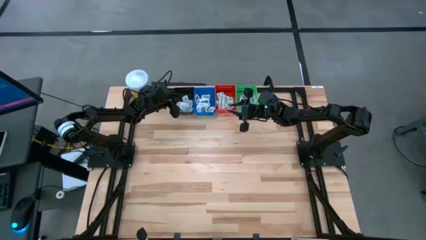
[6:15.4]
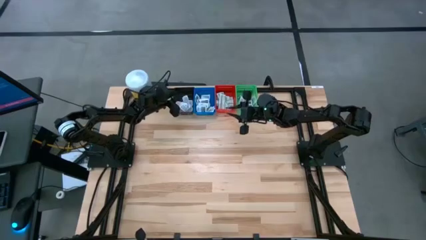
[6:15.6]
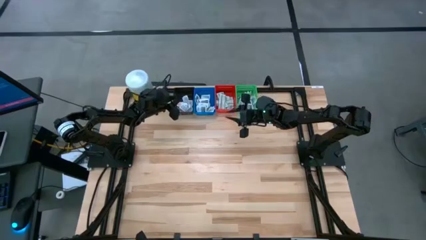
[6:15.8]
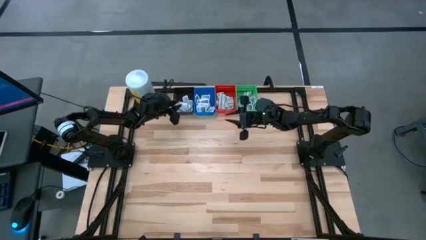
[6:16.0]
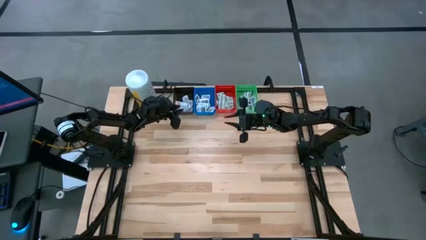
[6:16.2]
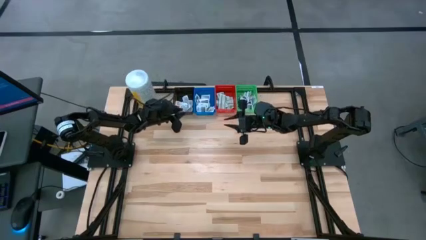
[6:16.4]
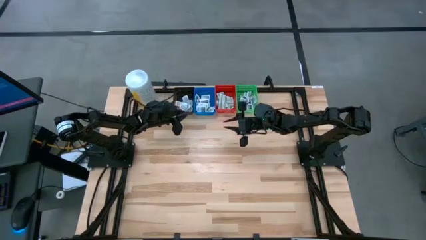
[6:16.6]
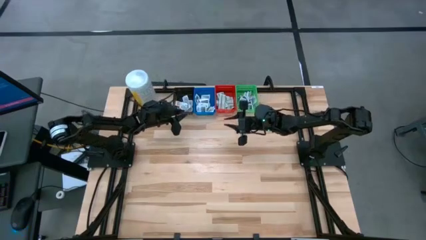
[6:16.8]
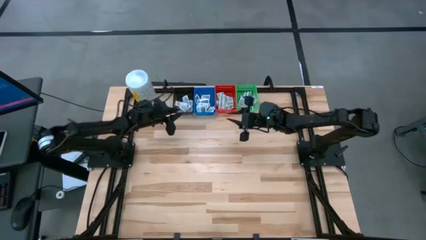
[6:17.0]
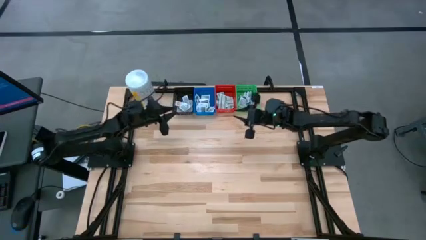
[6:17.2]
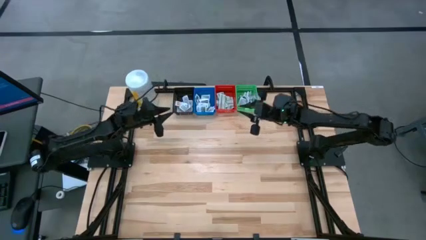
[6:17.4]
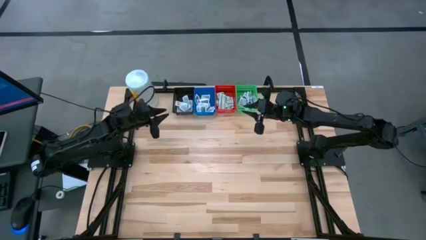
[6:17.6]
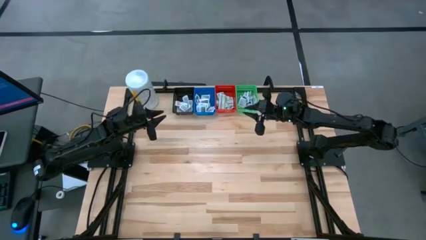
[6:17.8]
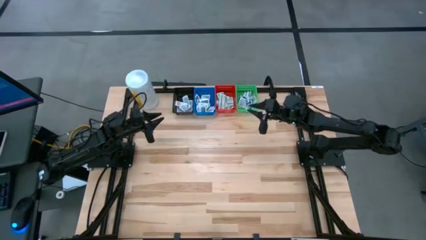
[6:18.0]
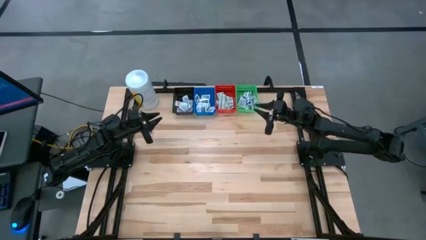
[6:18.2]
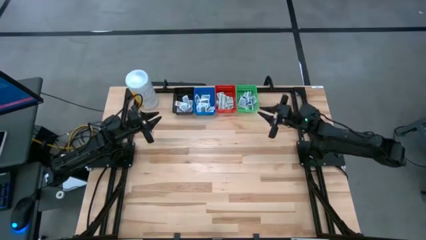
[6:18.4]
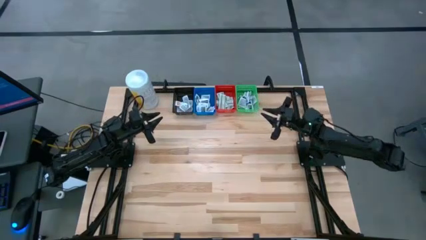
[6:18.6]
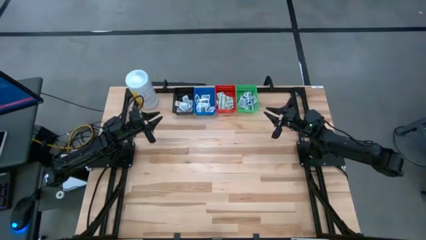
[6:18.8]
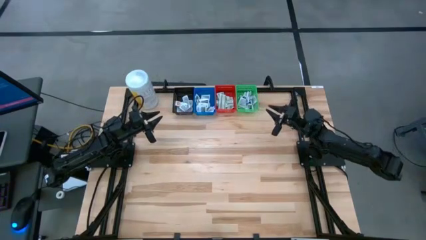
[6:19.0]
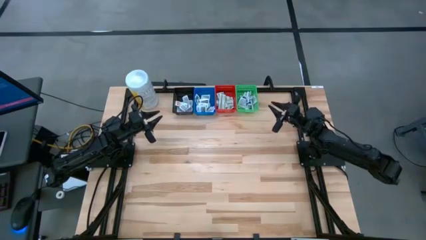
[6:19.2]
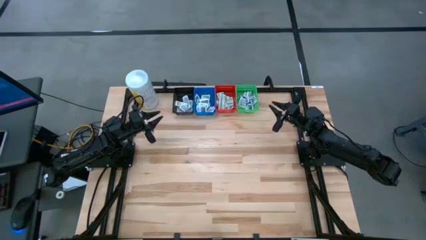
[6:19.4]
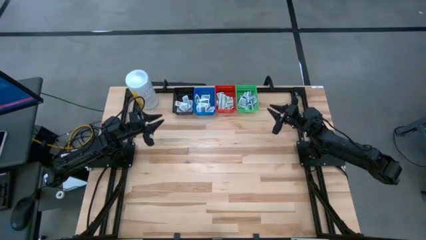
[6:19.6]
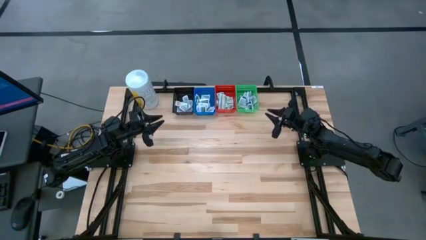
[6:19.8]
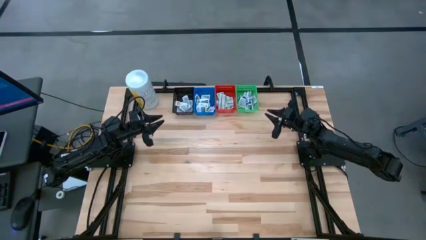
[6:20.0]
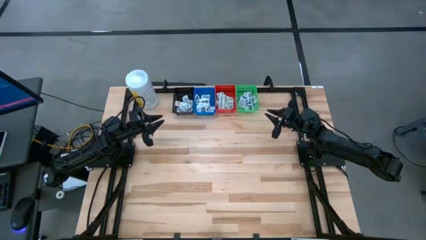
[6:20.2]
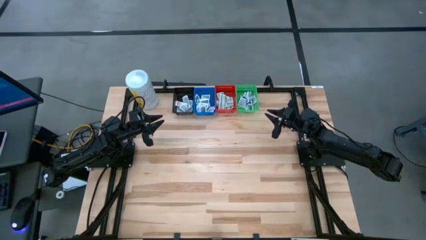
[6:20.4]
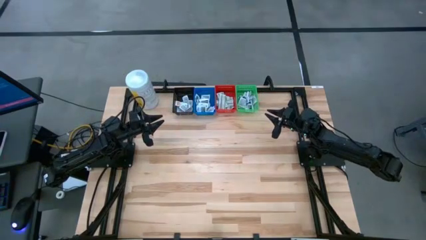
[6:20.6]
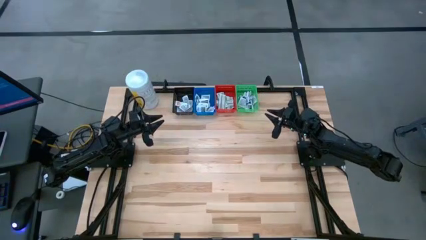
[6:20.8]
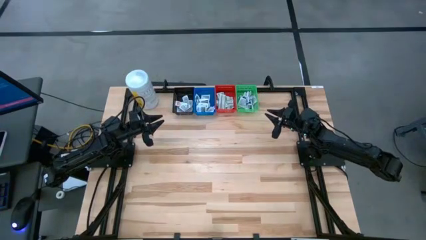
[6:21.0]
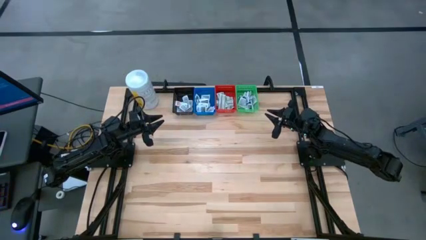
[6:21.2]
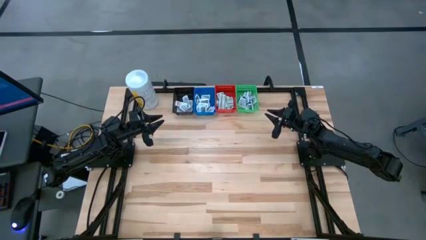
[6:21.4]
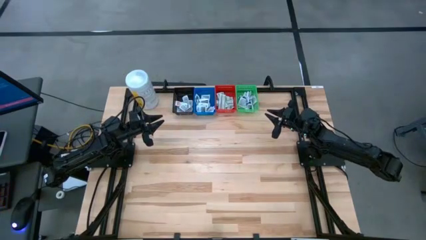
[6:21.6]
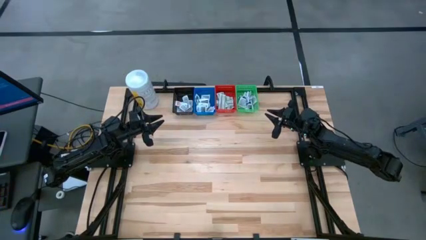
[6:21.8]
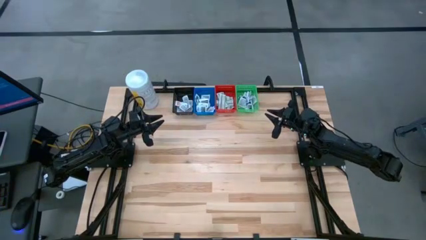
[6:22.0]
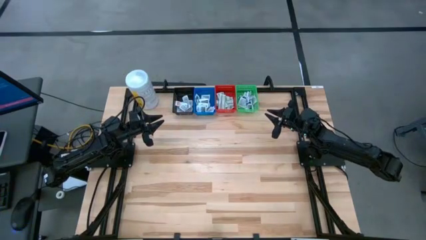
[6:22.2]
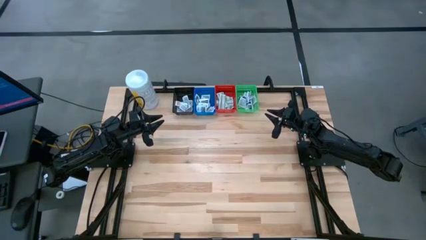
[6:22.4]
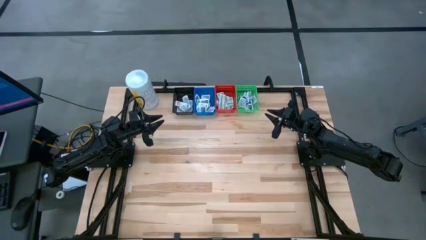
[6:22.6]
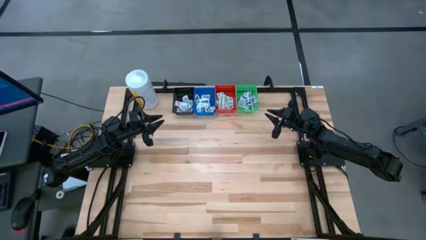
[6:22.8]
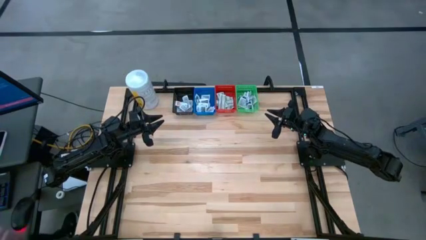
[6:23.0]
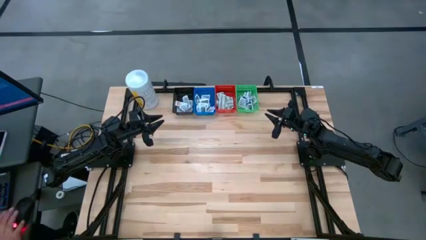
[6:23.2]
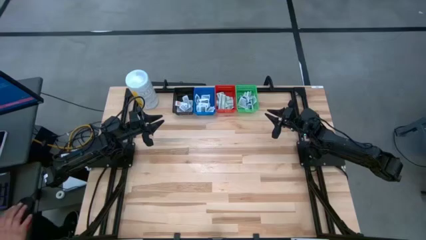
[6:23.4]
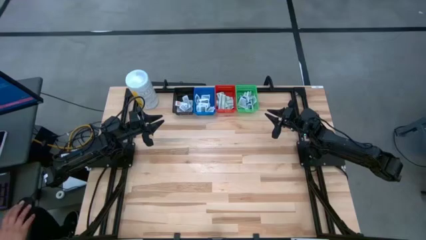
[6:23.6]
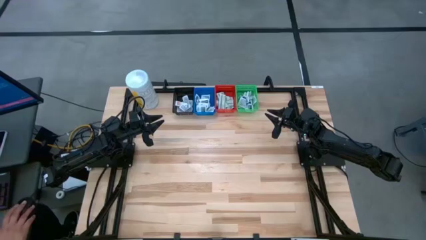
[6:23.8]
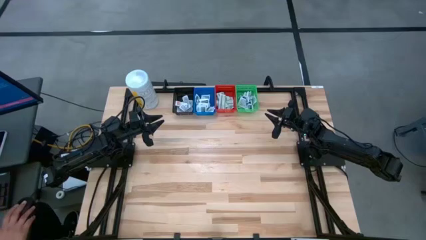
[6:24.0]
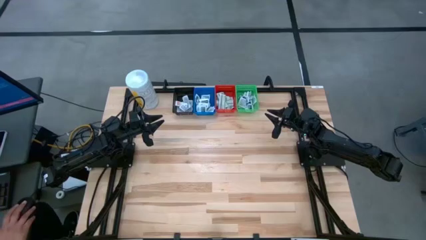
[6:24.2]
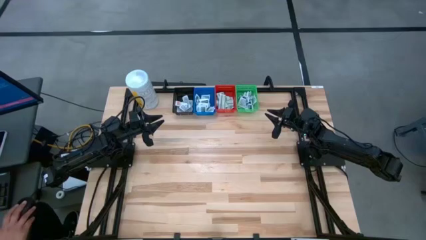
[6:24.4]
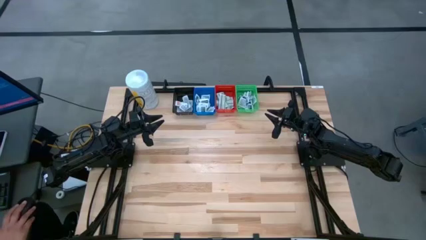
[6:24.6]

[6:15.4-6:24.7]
Task: Pick & Place First Aid Supplies
Return to Home Position
